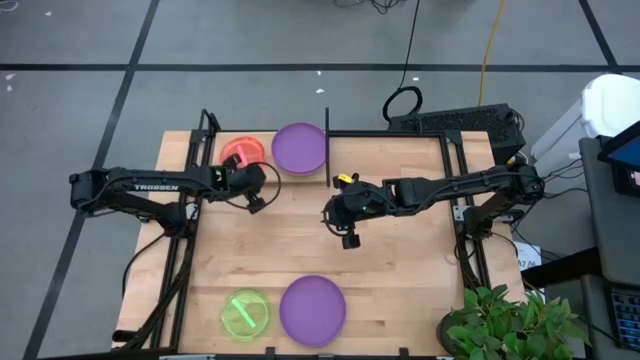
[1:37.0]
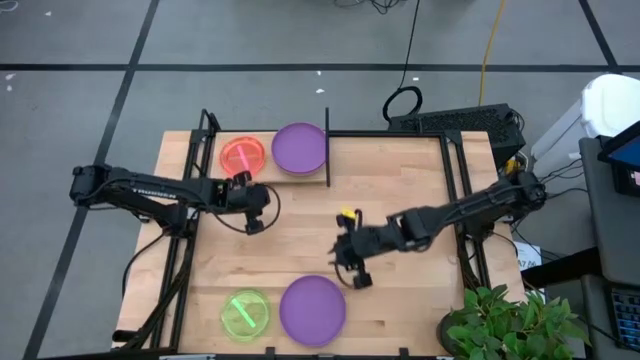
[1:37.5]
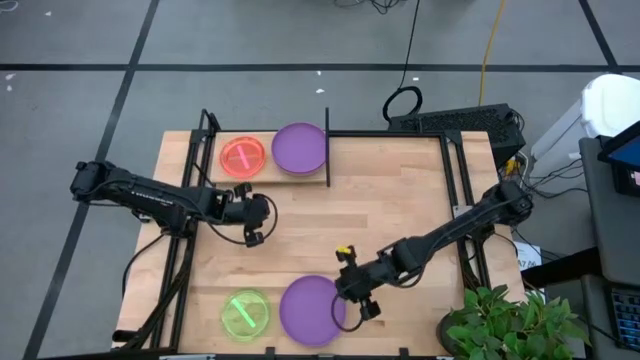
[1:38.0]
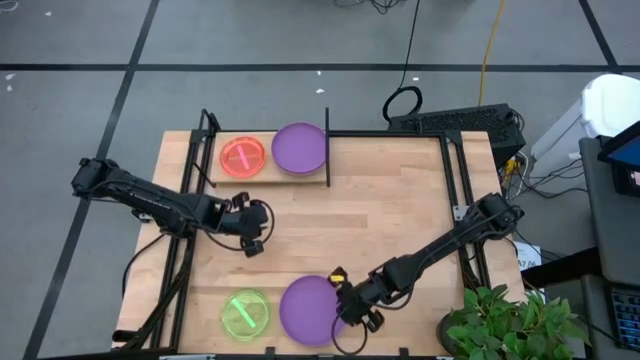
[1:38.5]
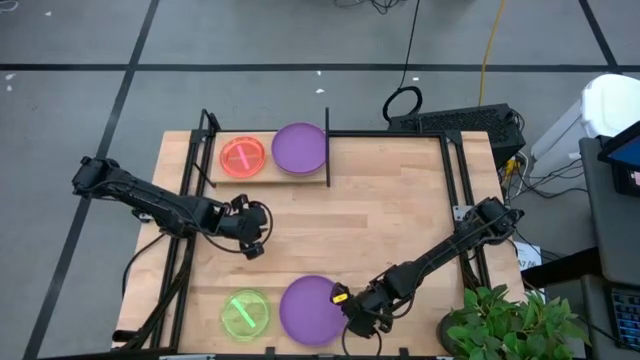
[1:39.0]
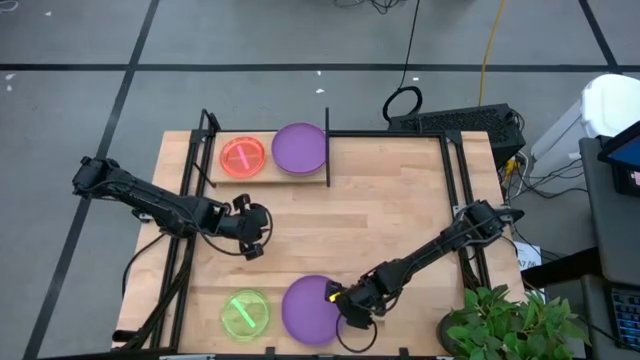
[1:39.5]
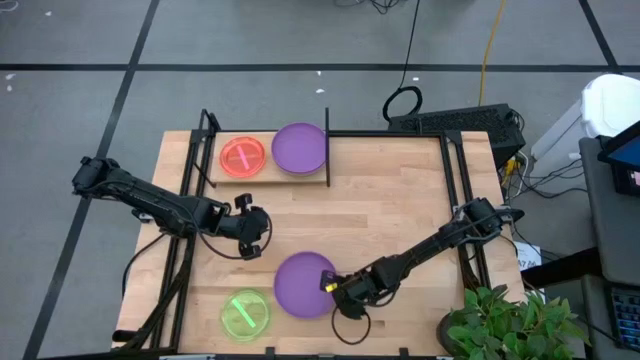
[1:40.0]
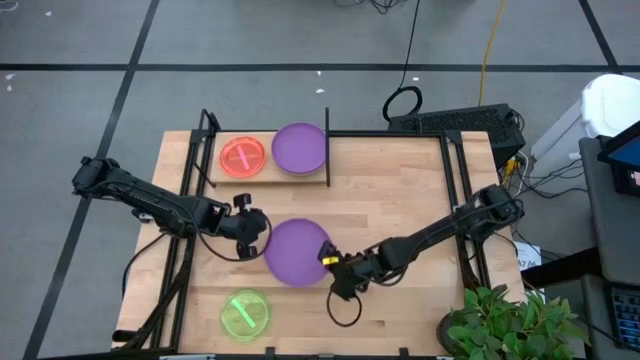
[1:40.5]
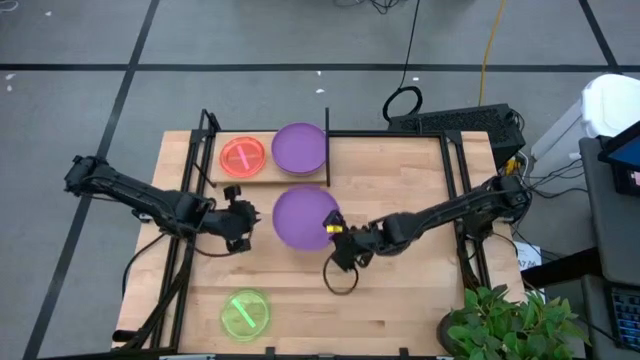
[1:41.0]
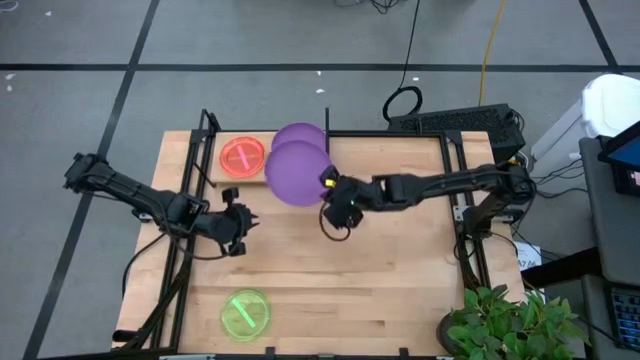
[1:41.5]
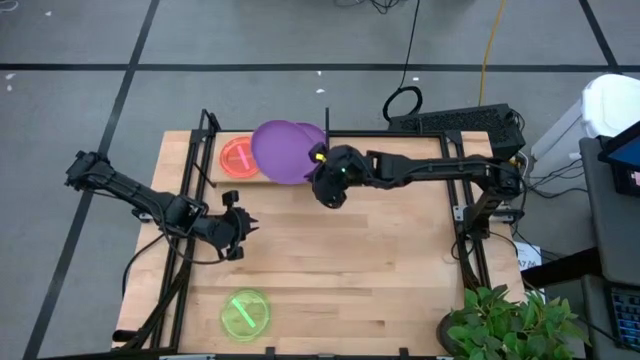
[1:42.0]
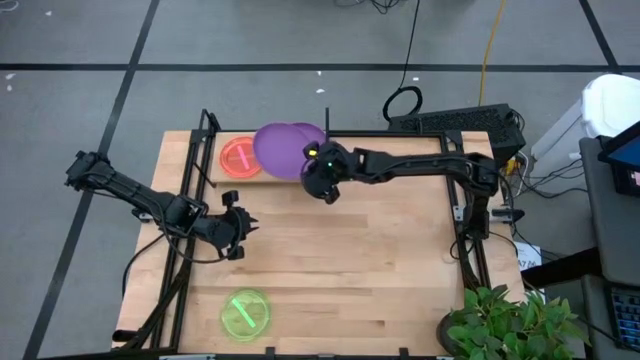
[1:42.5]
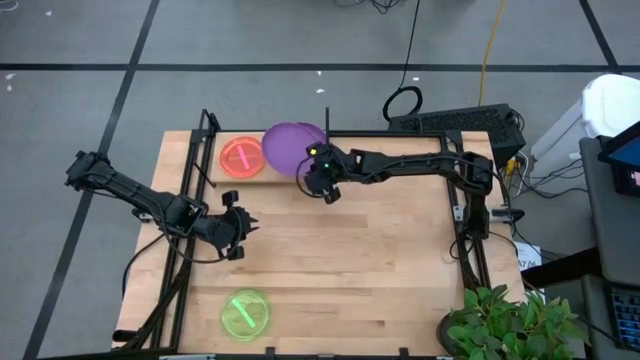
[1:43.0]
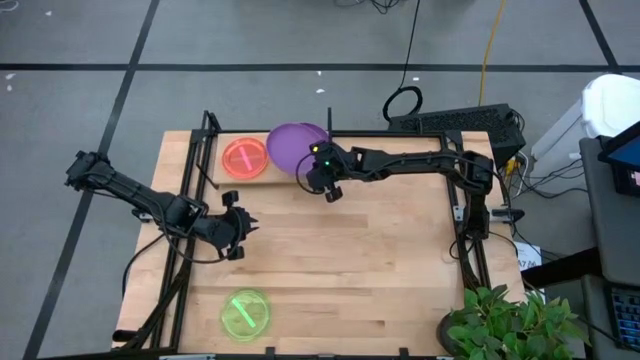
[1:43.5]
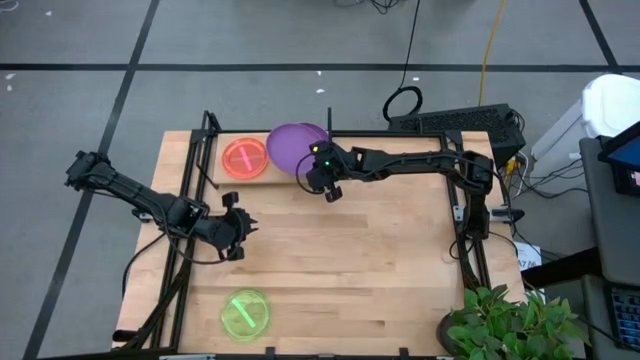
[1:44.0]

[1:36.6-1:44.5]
Task: Place and stack plates onto a shelf
Stack the purple plate on the purple plate on the shelf

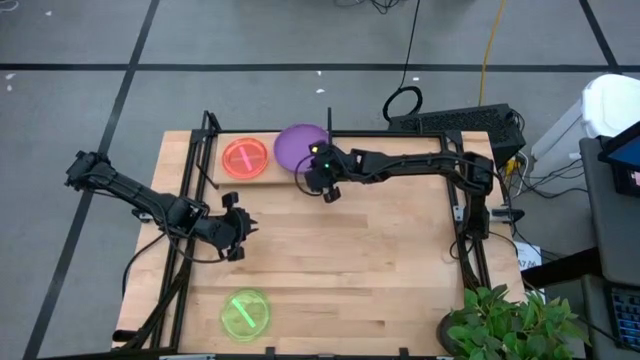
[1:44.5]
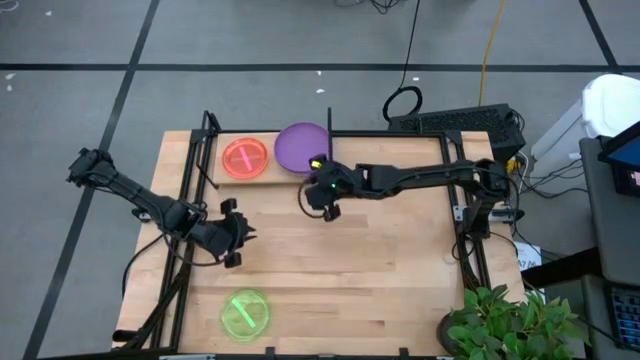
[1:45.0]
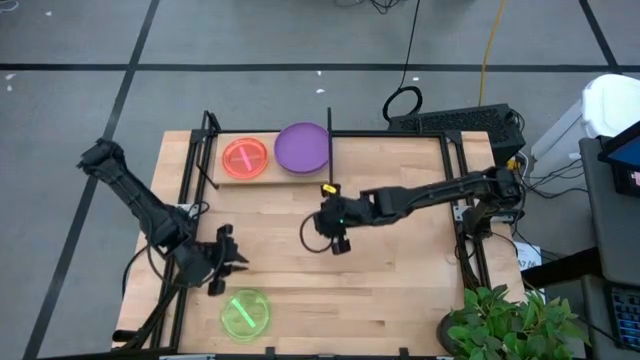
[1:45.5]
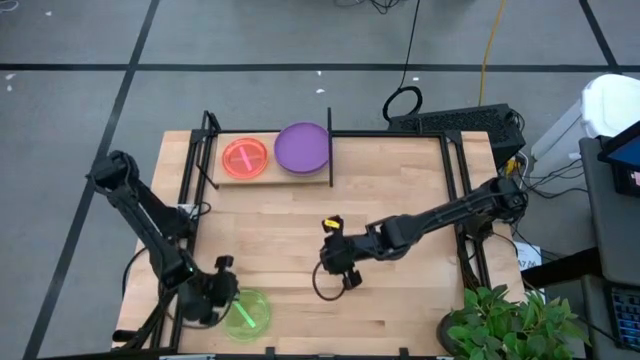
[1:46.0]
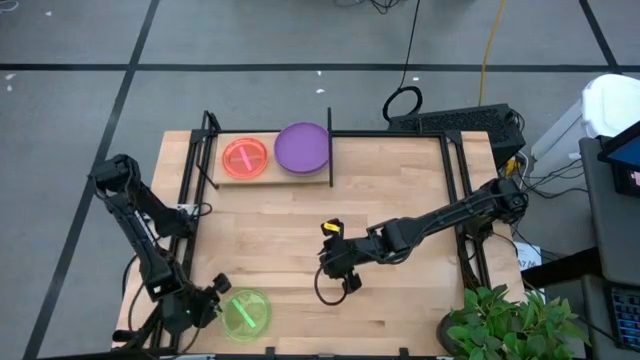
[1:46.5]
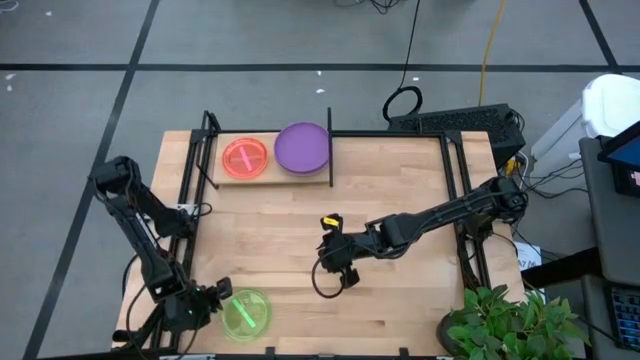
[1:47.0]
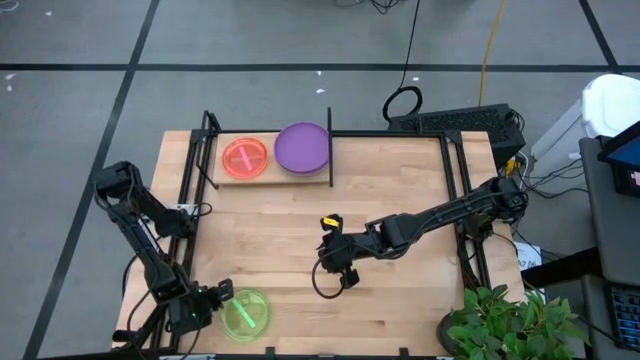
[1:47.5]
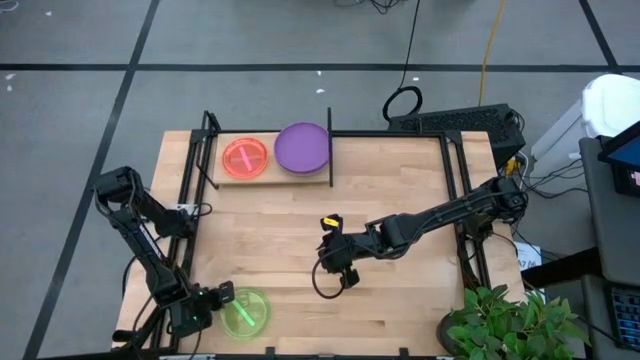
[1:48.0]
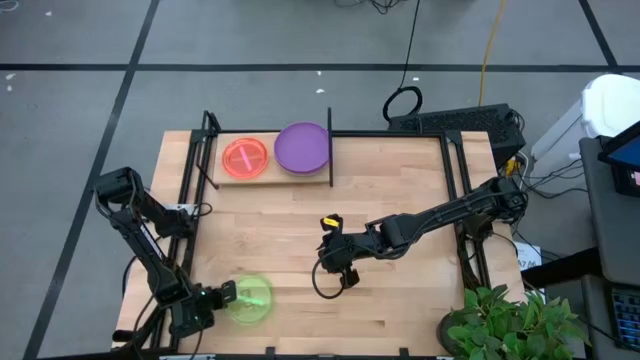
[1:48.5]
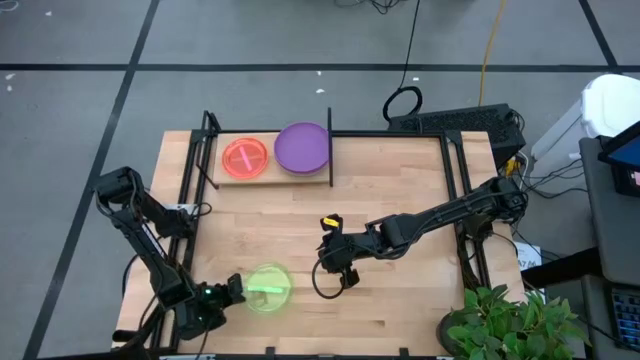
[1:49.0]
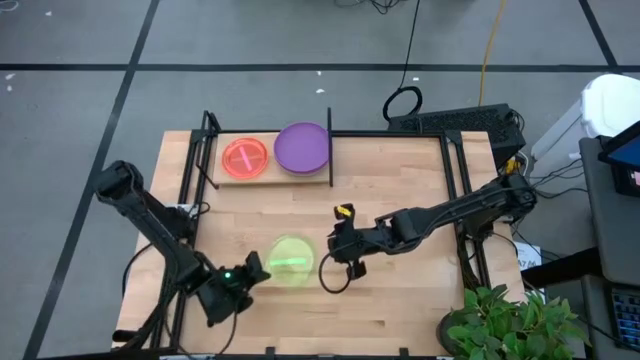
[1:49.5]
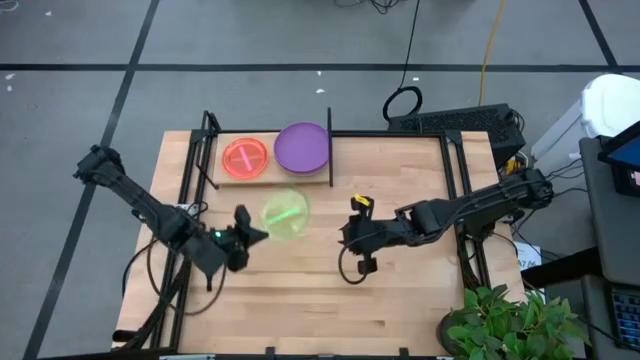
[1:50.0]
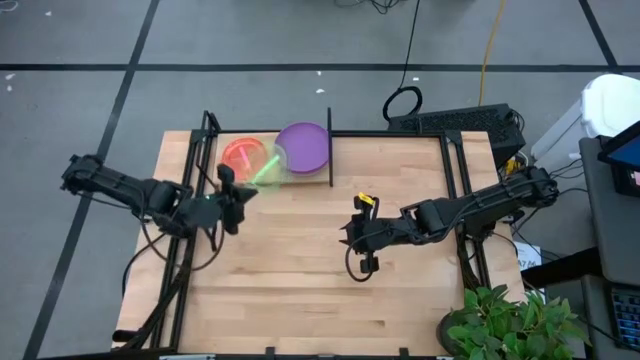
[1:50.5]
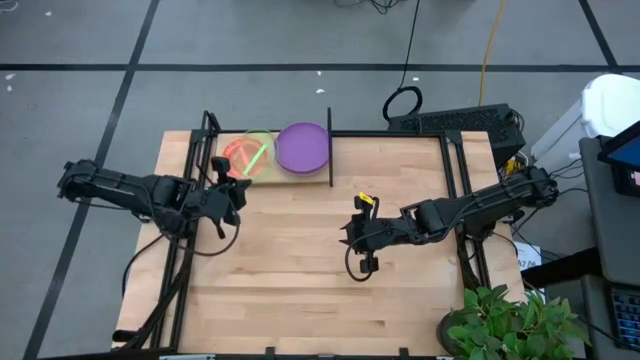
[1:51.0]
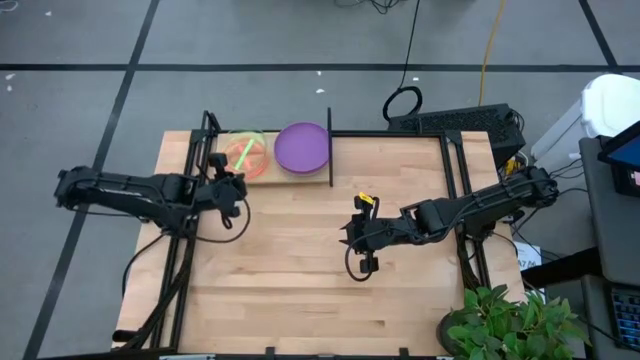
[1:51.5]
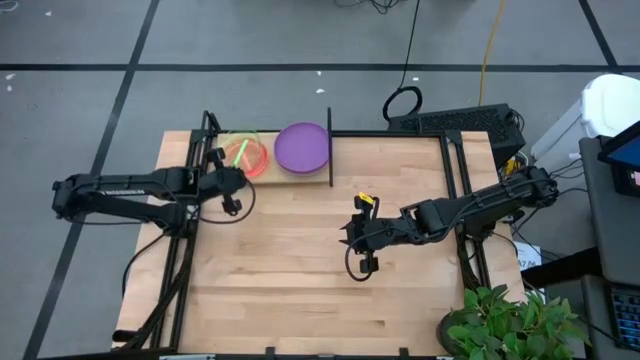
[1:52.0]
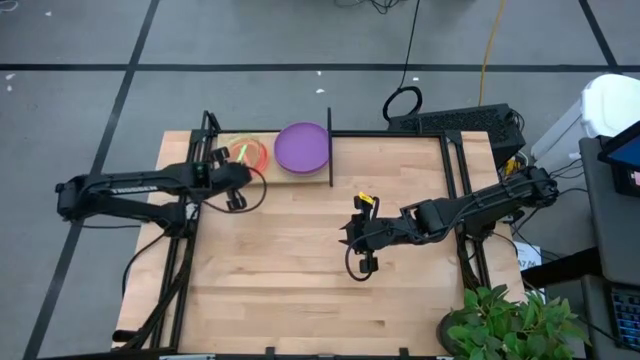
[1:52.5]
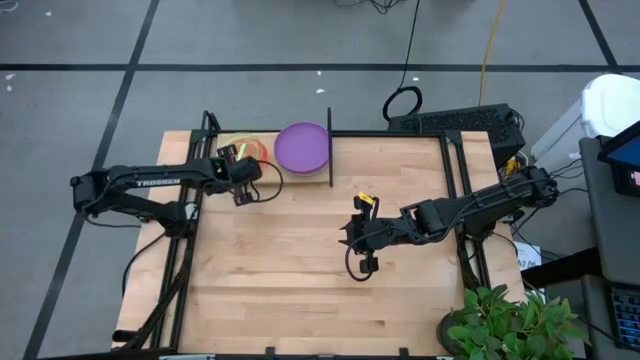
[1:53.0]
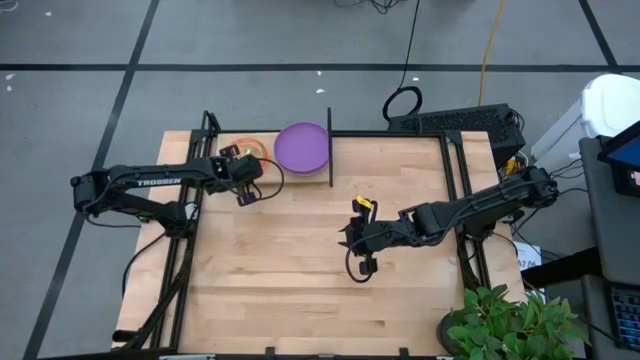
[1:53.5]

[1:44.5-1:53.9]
Stack the transparent green plate on the transparent red plate on the shelf

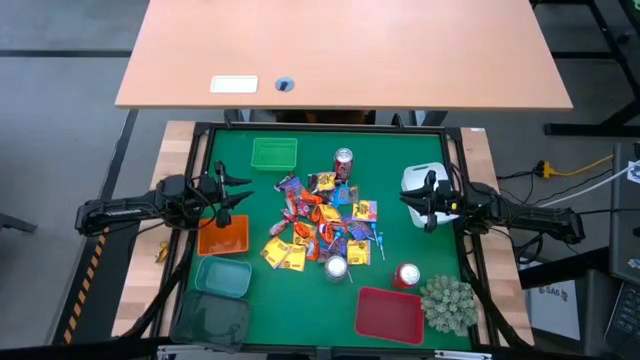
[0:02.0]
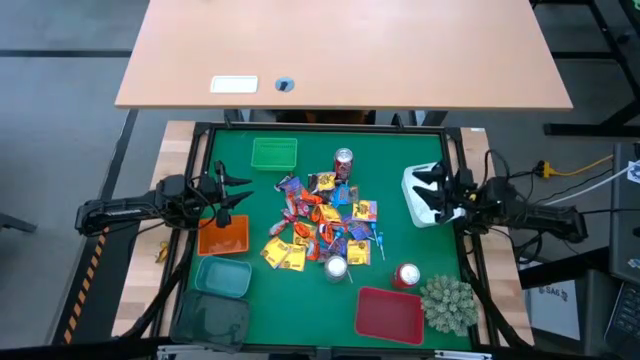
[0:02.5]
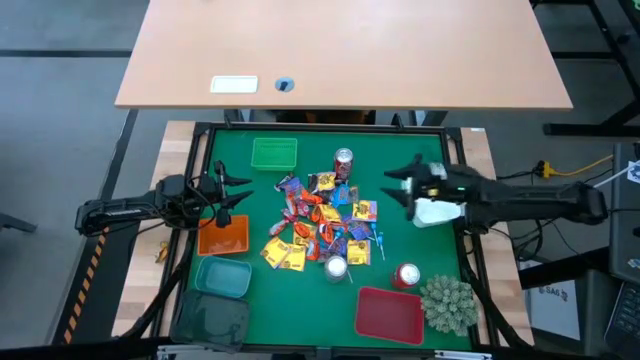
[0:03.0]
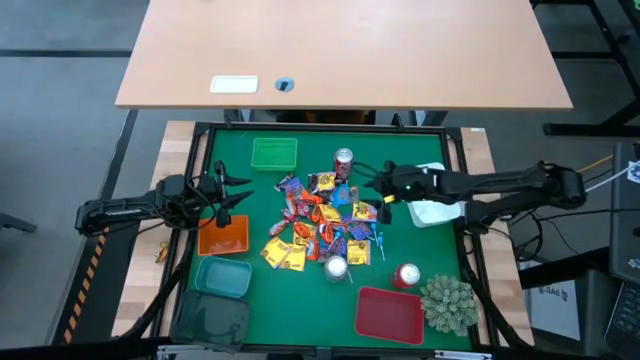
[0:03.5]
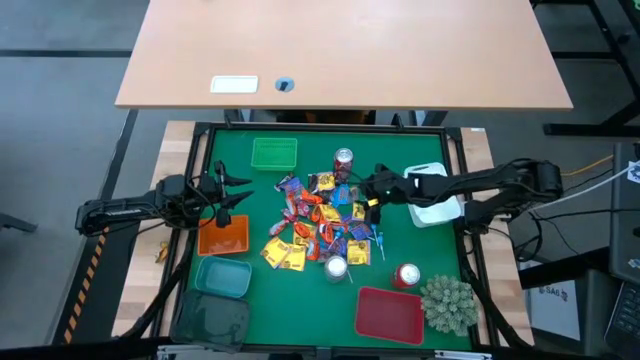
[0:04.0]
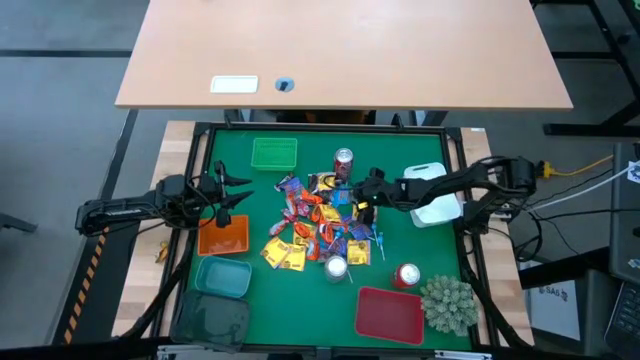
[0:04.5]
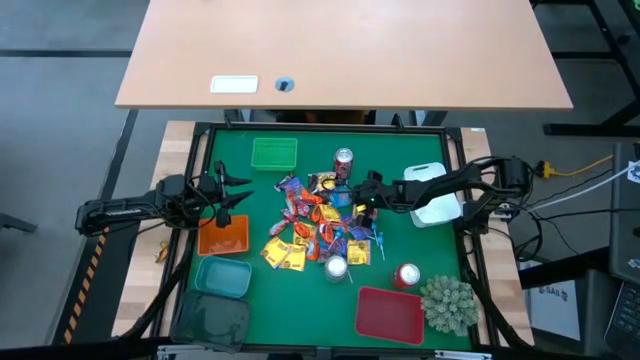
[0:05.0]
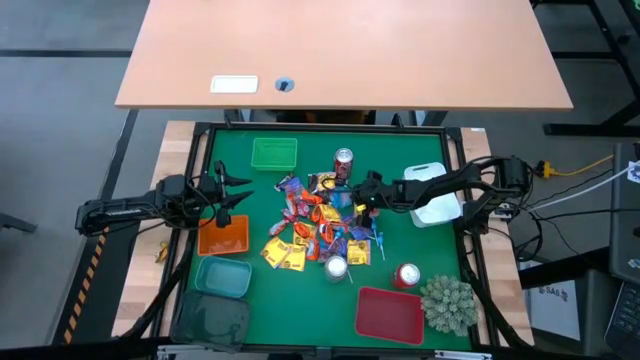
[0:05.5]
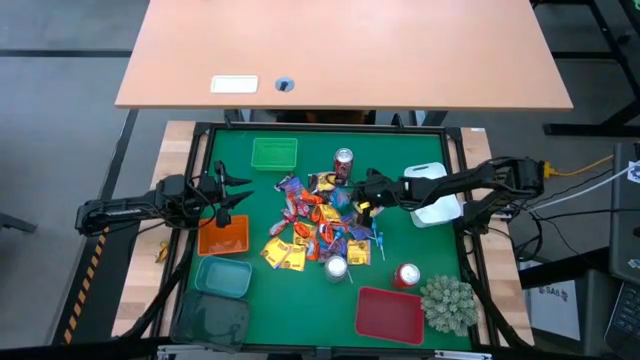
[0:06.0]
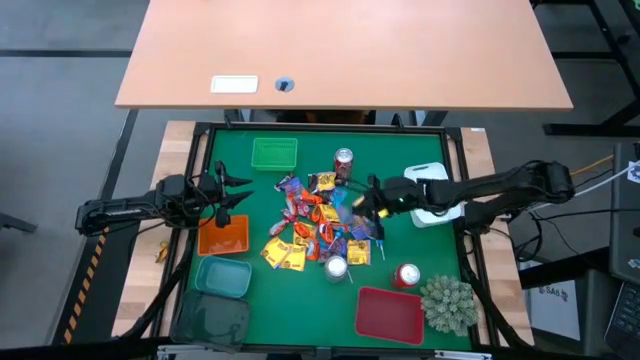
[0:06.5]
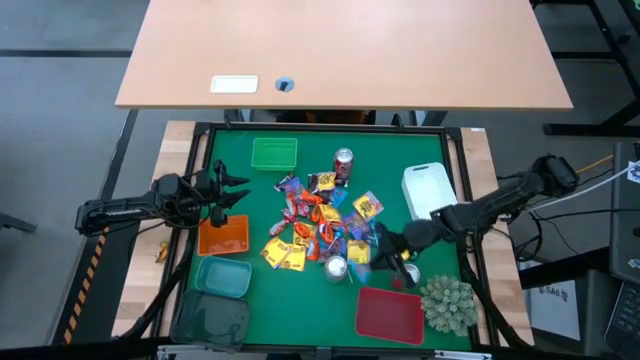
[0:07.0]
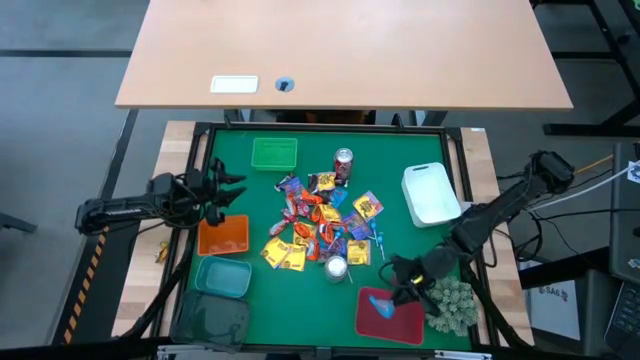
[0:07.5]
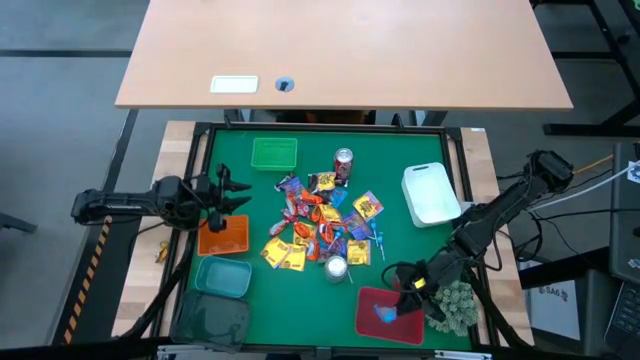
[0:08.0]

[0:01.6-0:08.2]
Task: Sort candy
Put the blue candy into the red bin
